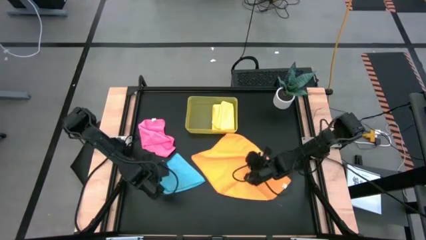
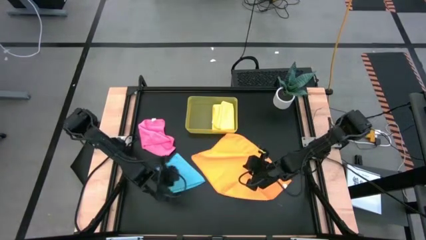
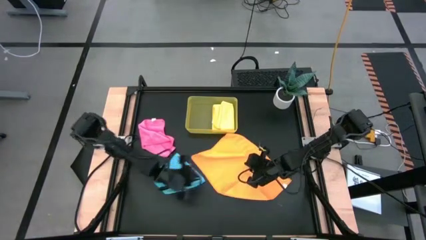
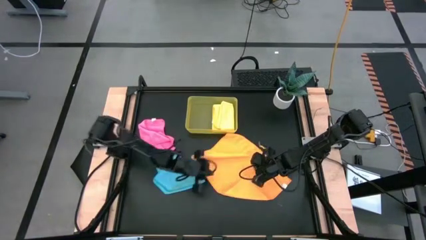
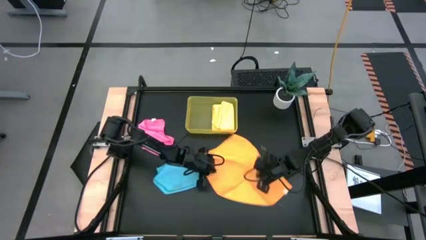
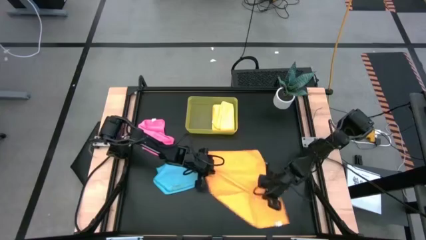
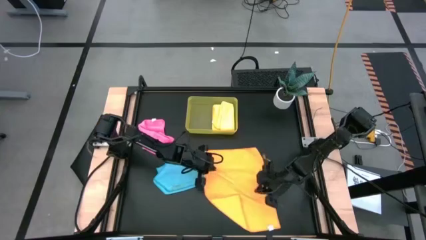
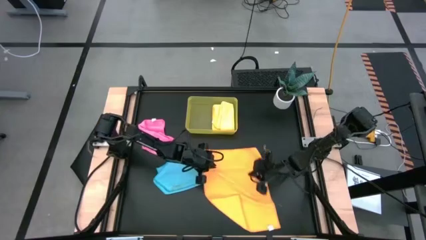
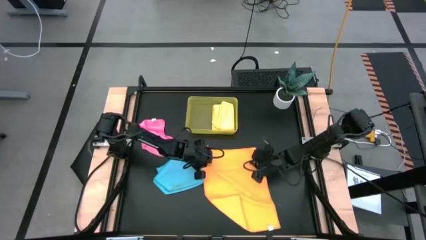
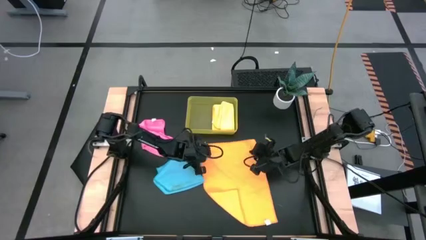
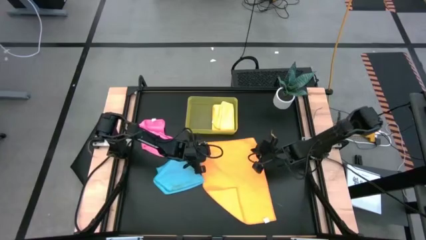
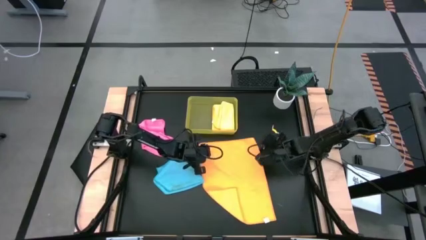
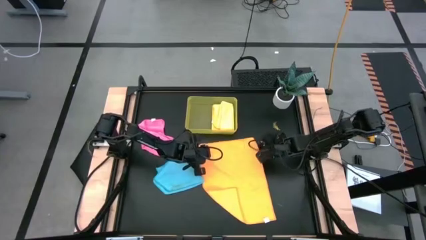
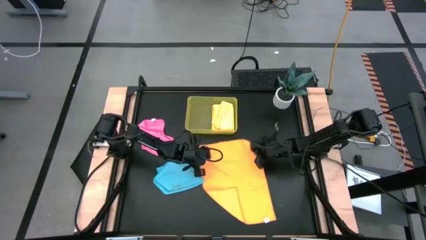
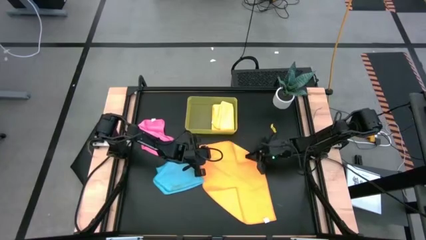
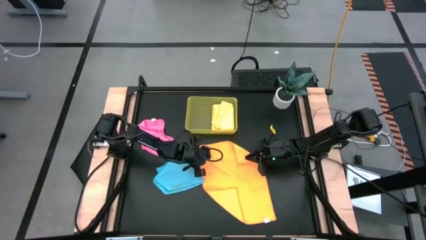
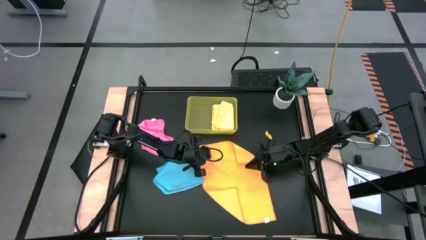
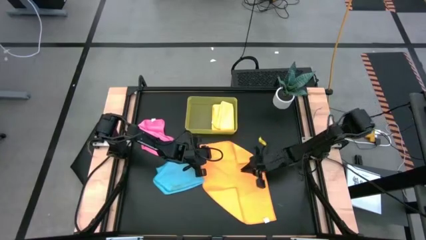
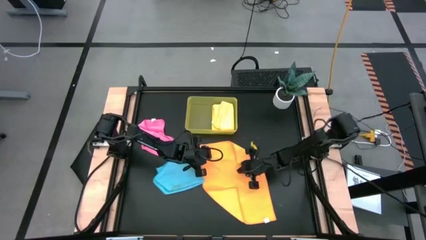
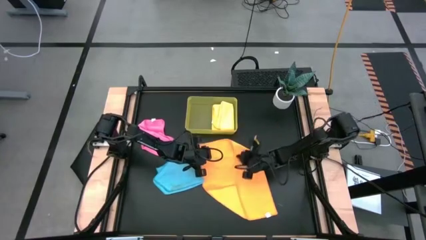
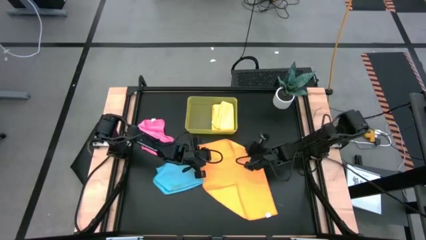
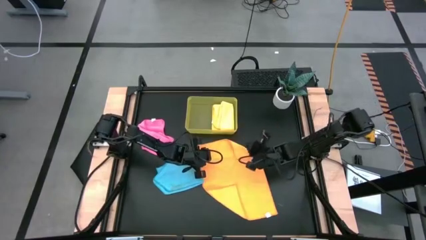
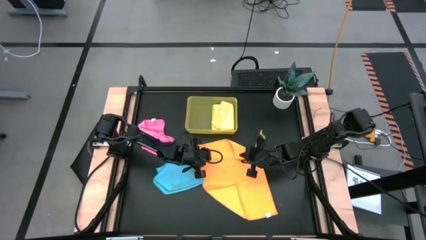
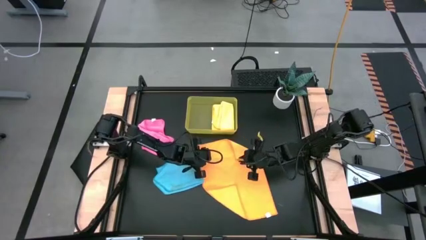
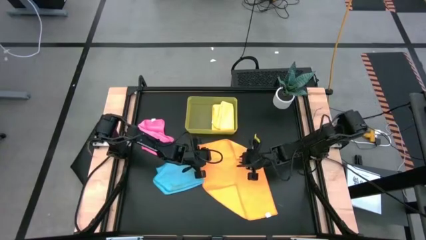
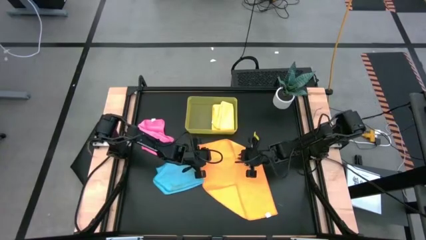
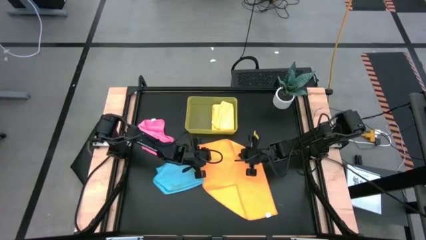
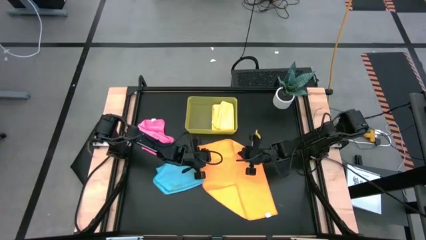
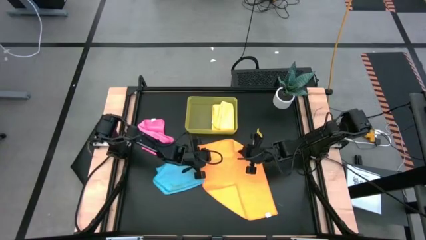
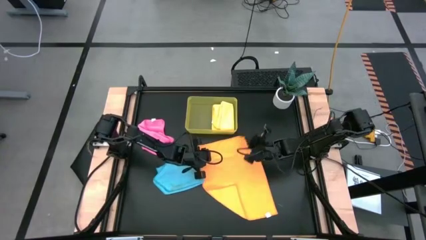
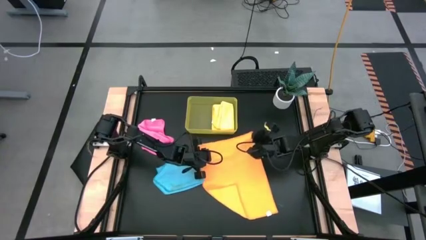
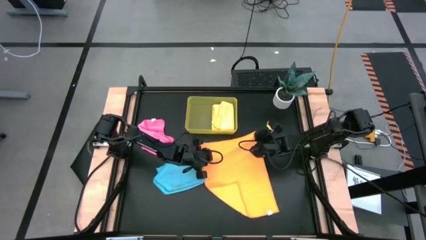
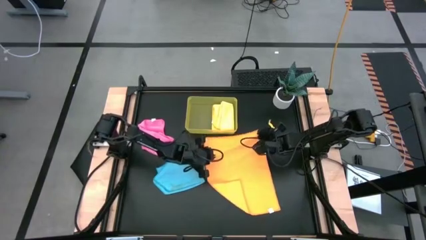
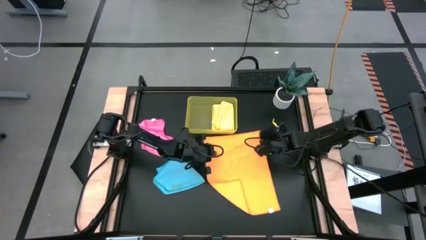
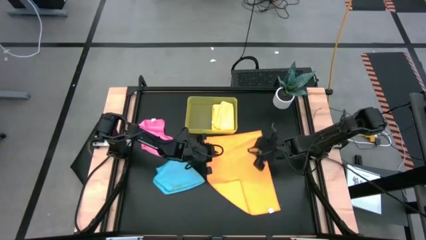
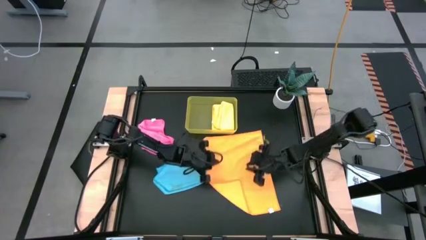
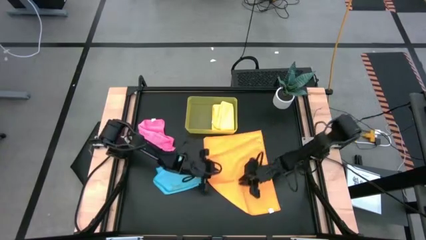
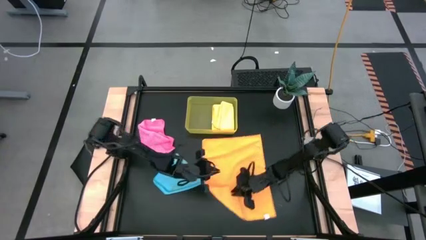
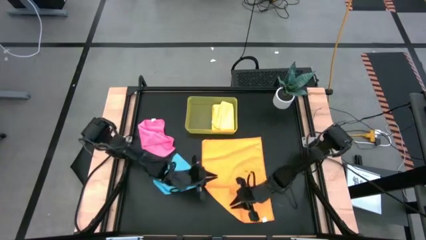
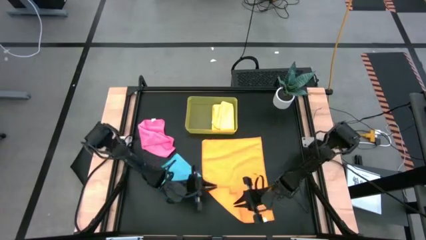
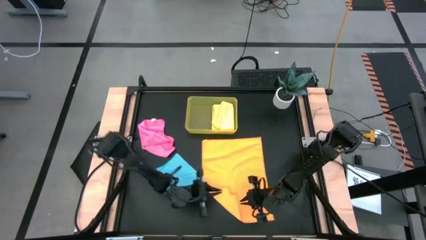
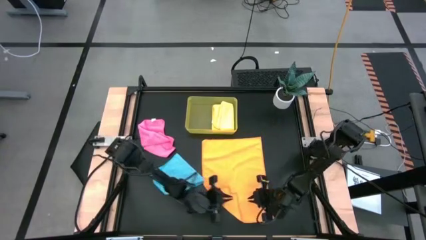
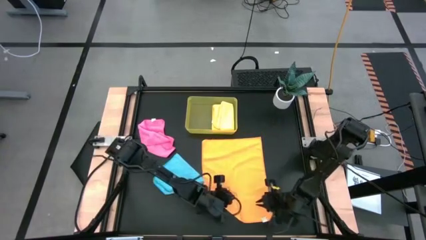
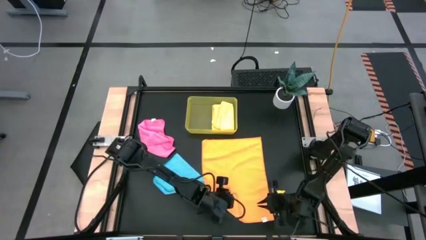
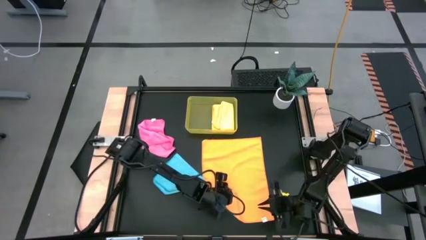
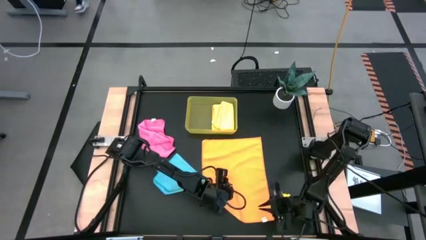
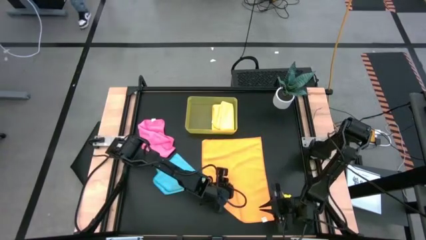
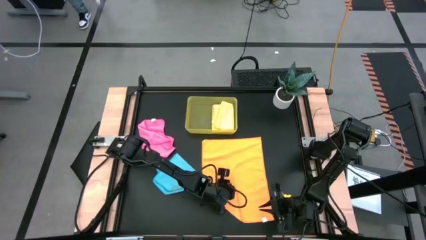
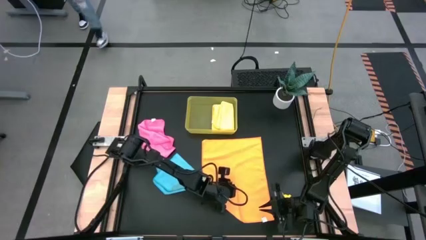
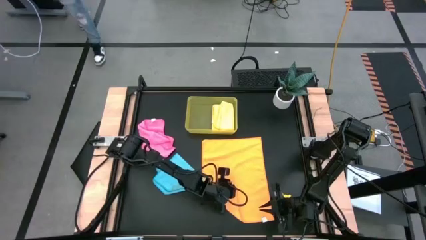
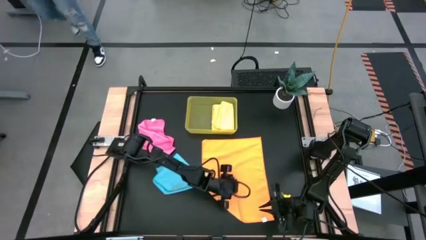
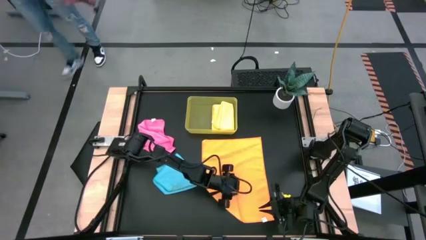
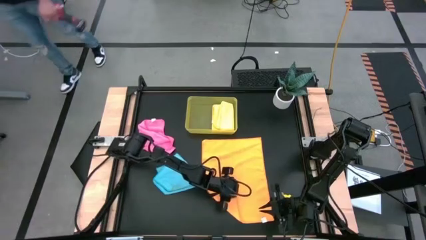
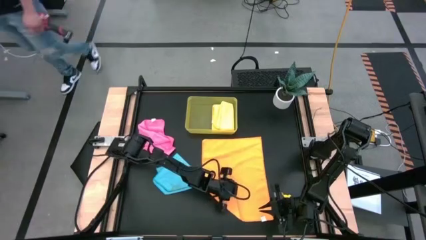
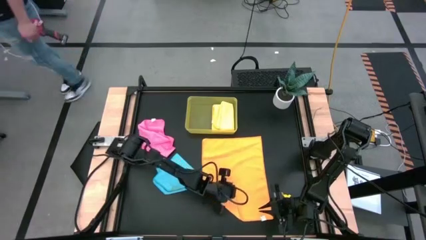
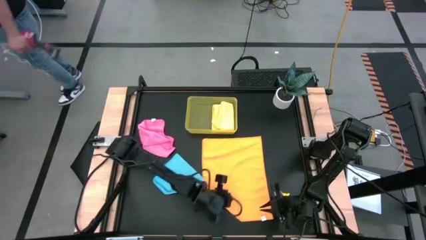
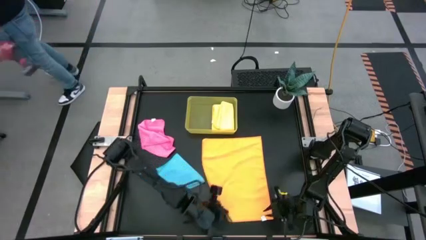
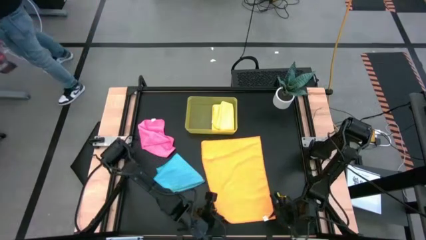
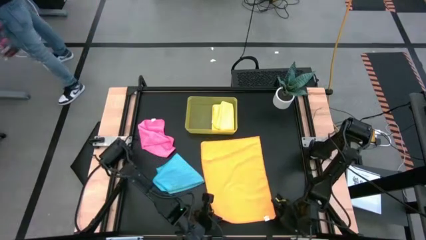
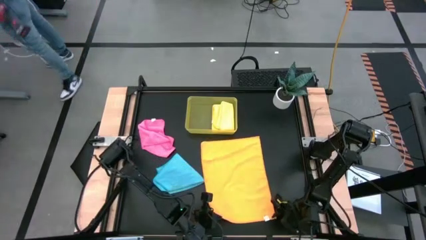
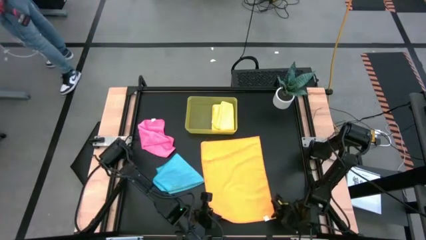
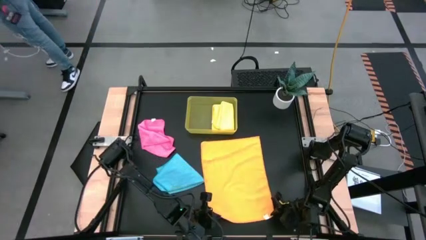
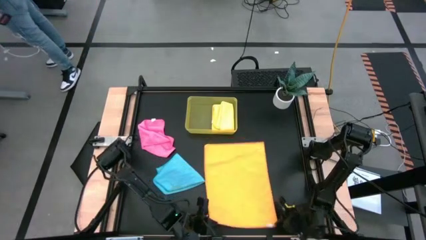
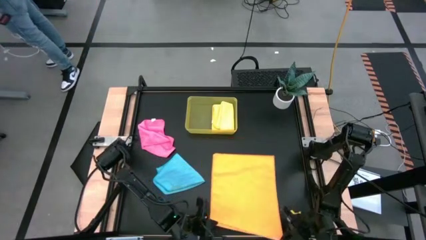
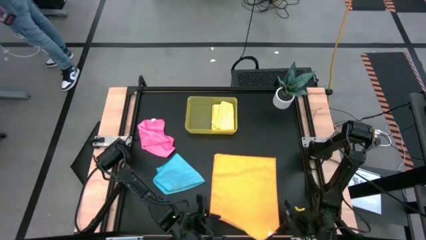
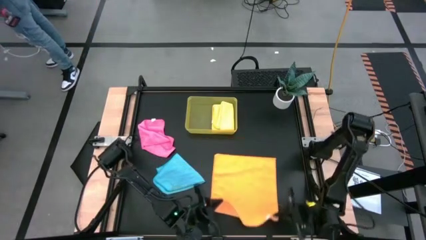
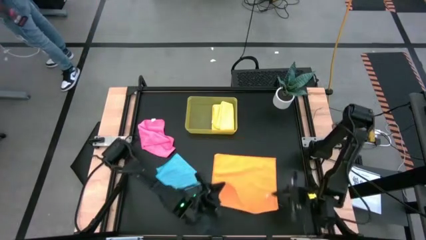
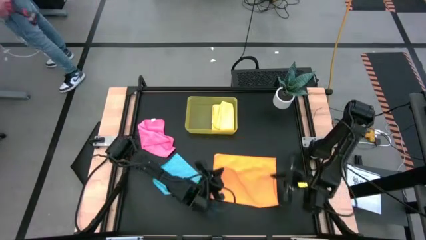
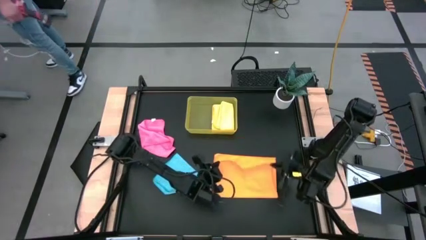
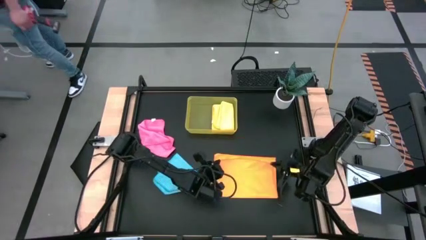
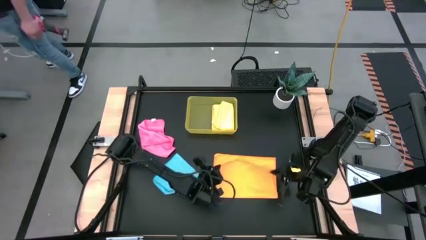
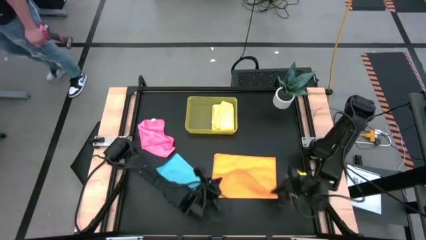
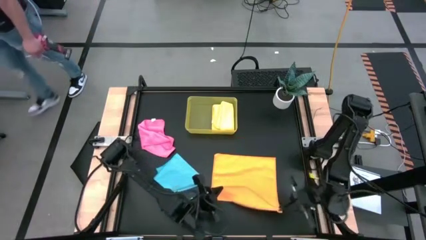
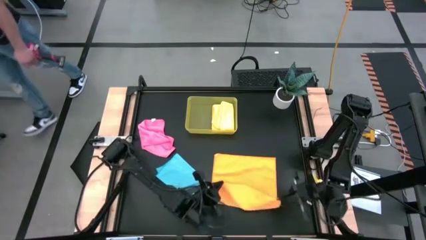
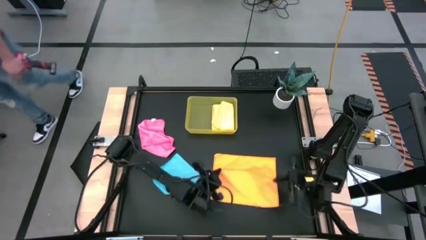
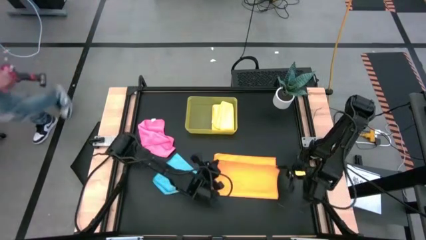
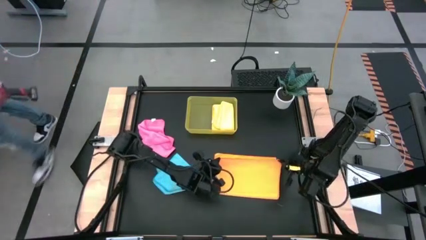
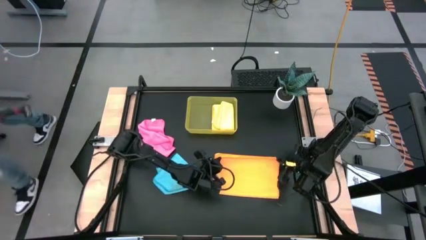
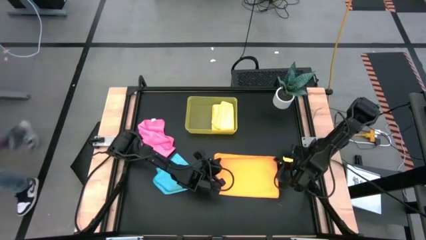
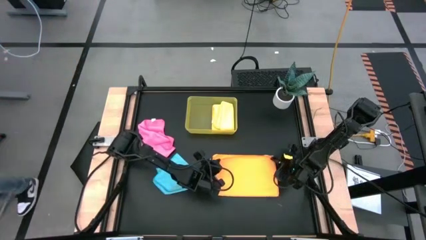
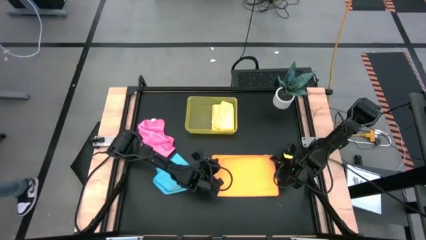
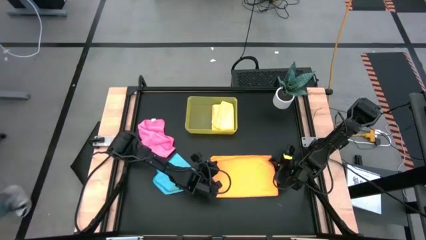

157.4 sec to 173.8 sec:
Task: Fold microfiber towels
Fold the orange microfiber cloth
